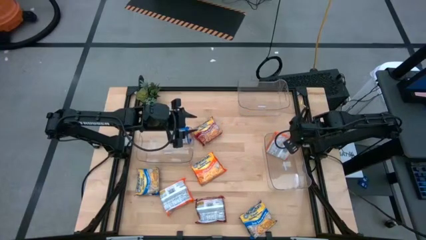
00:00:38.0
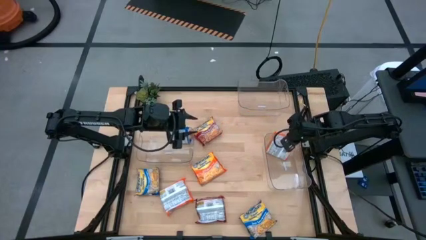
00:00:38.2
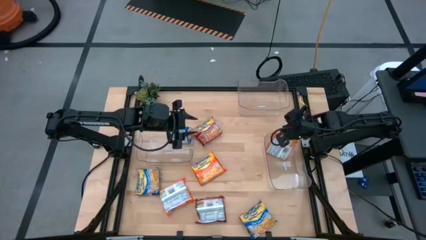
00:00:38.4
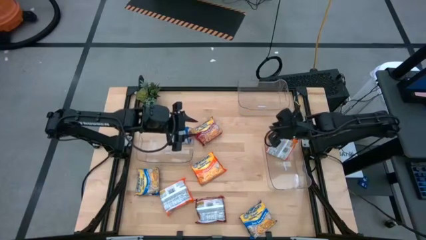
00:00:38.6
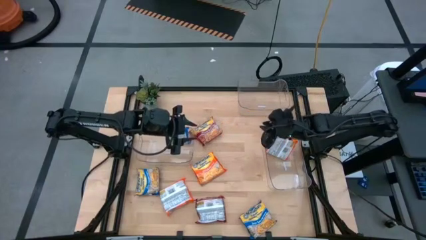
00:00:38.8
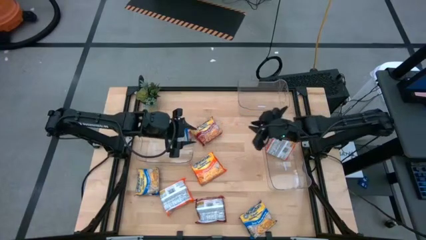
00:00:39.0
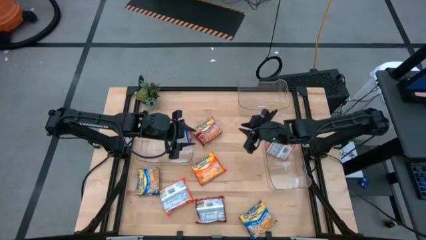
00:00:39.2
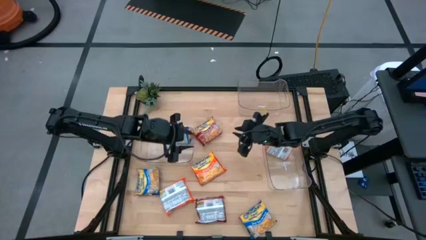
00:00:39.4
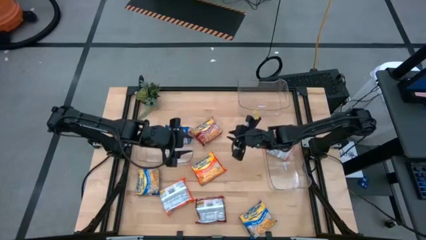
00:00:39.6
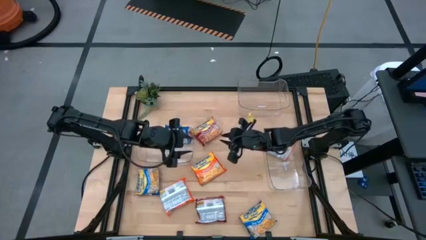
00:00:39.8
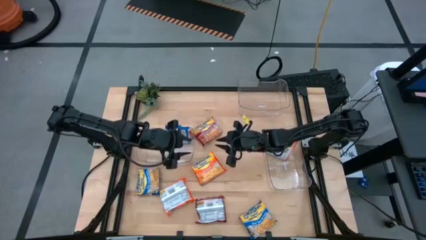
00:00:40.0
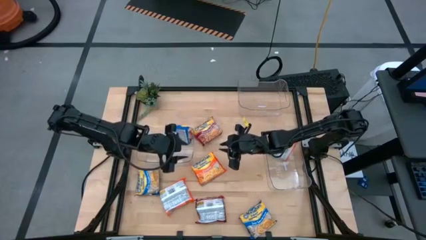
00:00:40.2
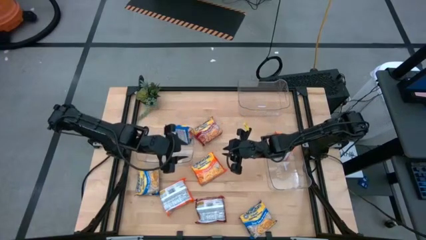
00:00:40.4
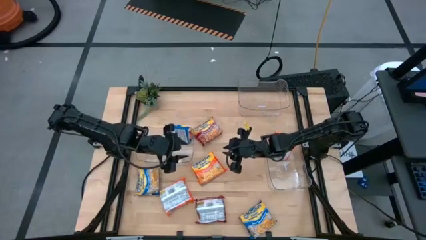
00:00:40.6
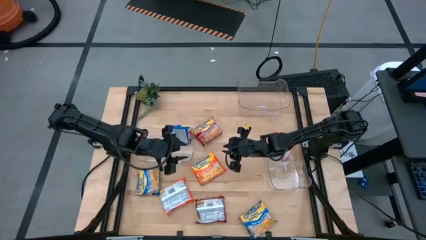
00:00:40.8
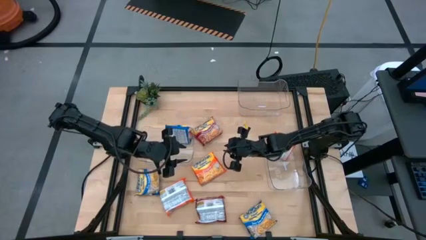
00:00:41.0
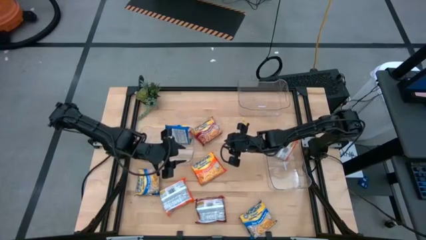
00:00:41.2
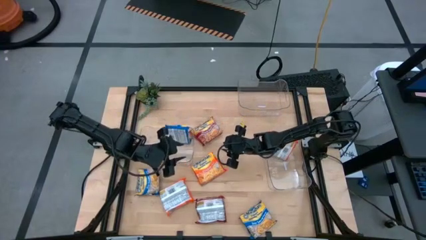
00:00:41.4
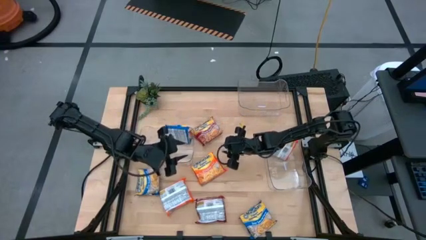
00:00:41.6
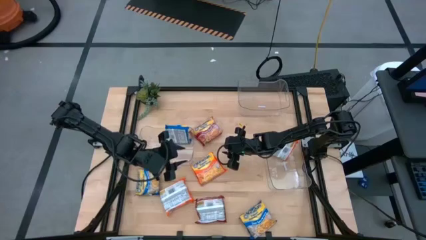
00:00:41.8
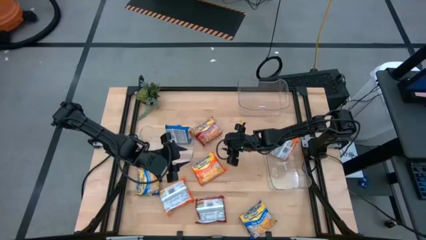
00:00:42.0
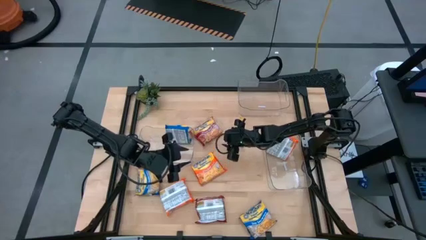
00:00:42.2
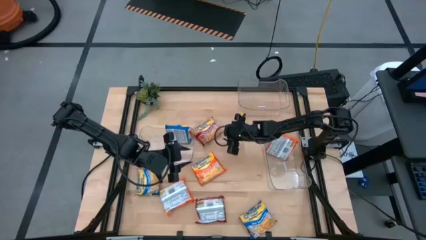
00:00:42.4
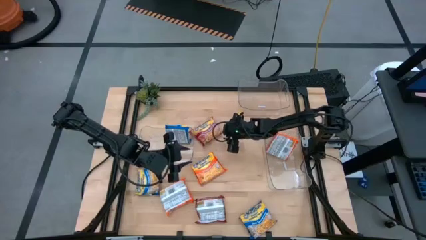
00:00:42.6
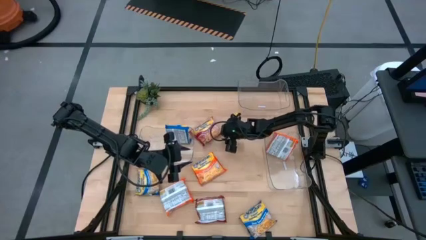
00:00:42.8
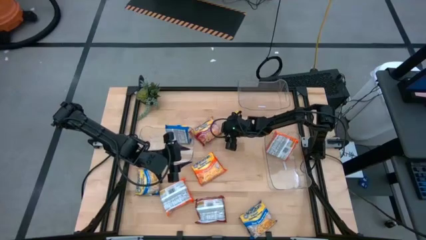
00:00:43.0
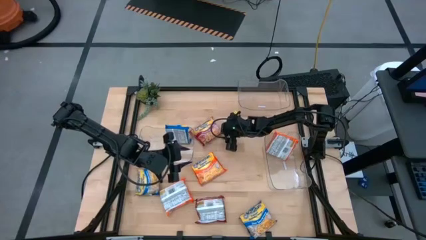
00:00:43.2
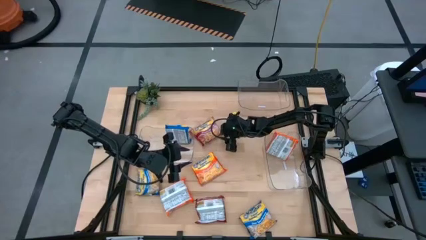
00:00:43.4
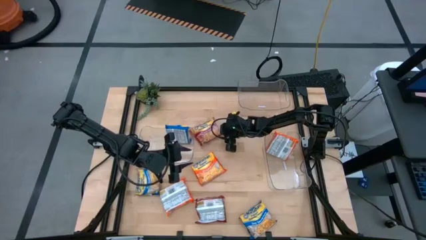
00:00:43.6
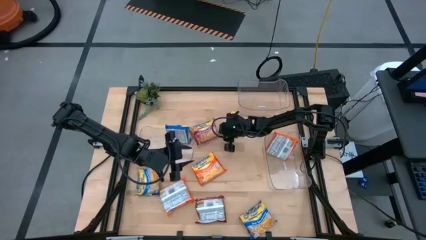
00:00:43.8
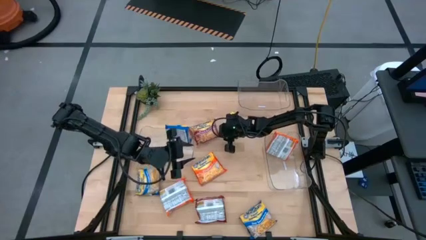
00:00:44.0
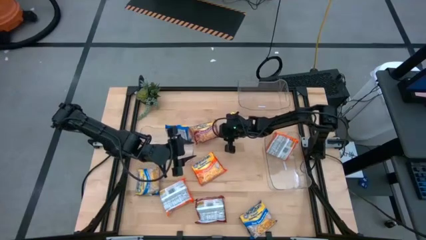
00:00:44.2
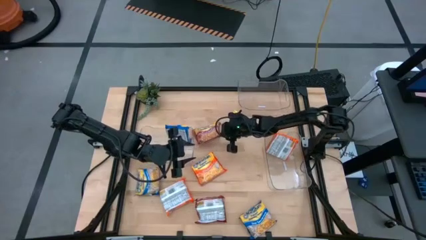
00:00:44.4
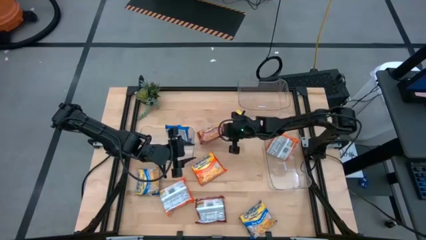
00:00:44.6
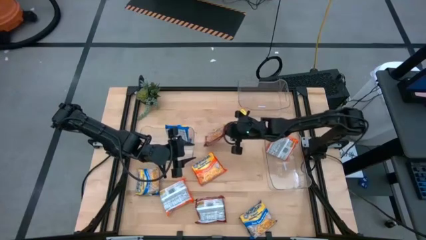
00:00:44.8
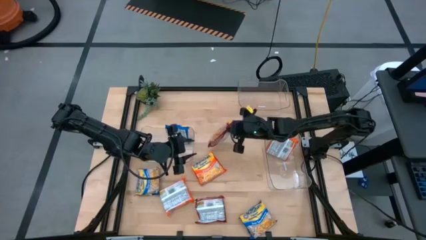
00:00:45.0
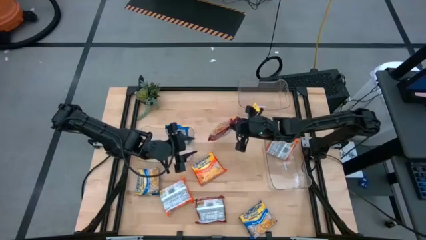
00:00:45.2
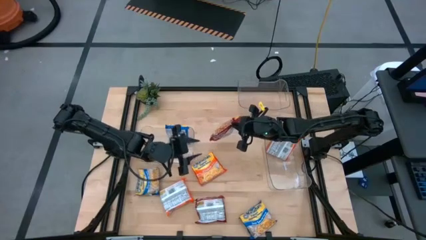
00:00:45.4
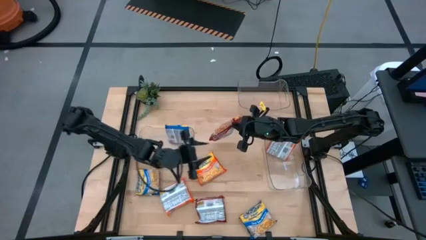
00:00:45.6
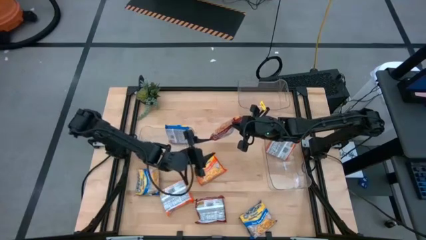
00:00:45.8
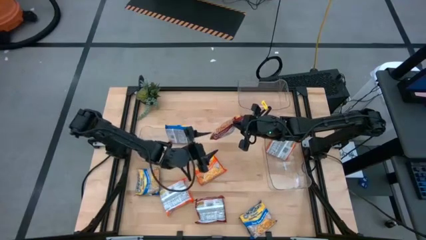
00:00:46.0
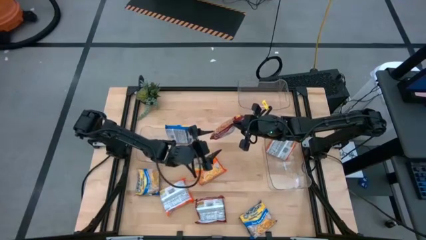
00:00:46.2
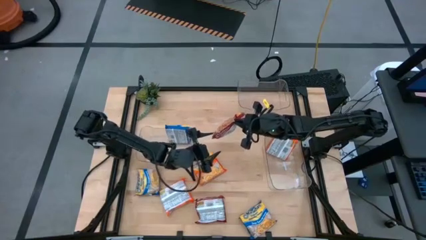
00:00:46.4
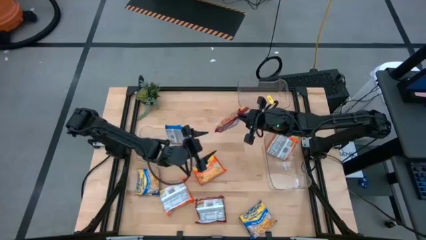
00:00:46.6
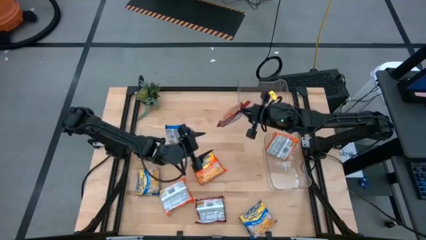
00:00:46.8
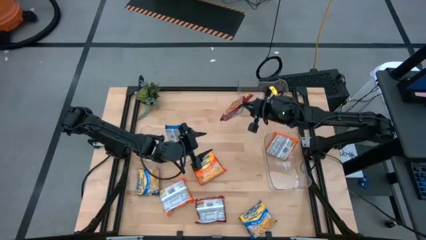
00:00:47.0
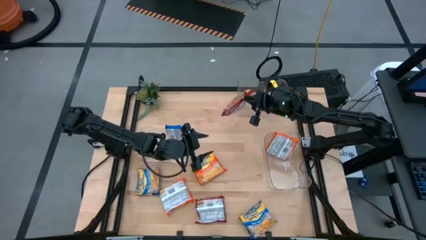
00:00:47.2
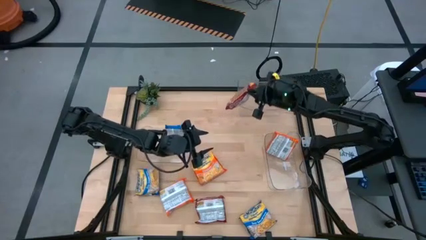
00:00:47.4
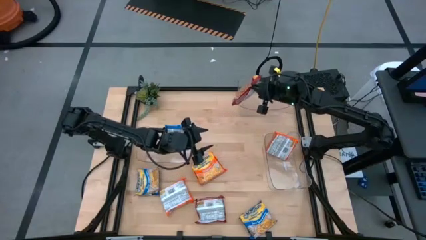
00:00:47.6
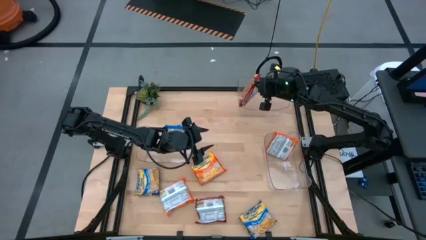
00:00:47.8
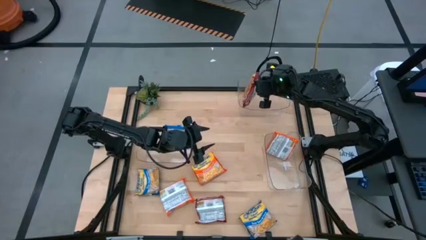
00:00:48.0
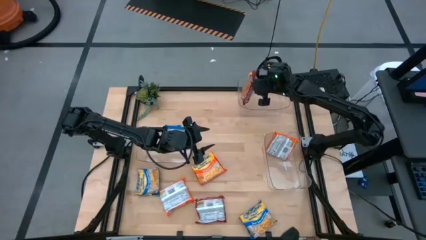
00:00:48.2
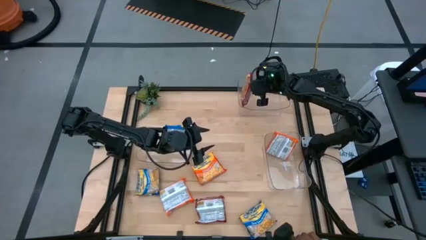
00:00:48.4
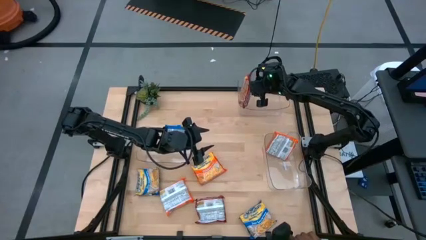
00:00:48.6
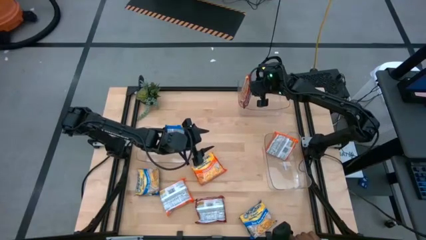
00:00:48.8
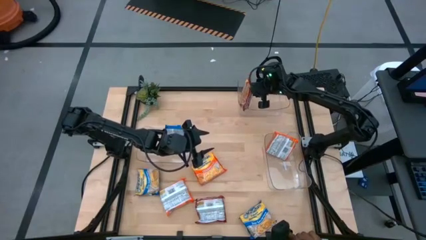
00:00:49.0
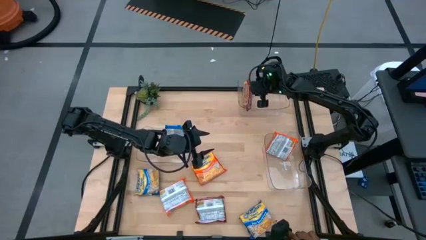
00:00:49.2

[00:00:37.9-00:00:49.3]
Task: Sort Maruchan noodles
Put the top red noodle pack into the top transparent bin

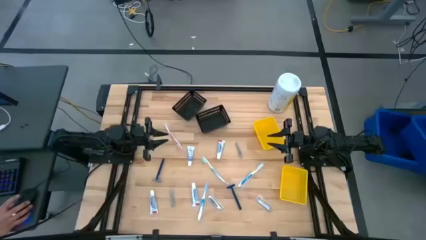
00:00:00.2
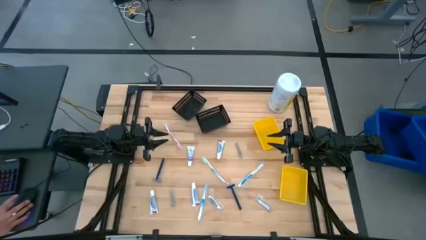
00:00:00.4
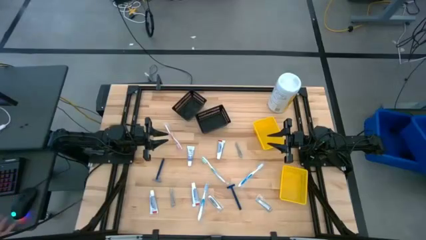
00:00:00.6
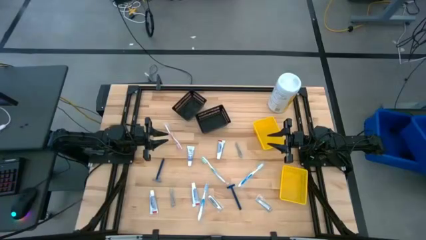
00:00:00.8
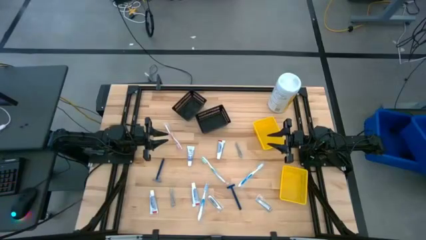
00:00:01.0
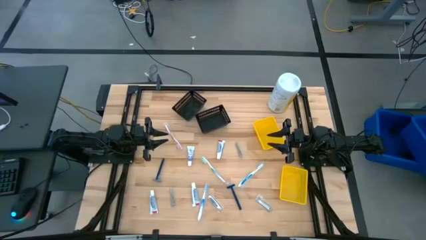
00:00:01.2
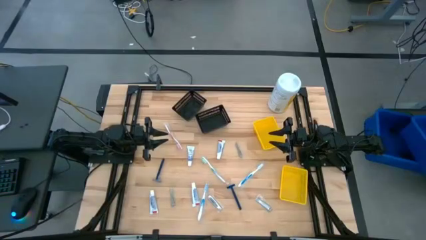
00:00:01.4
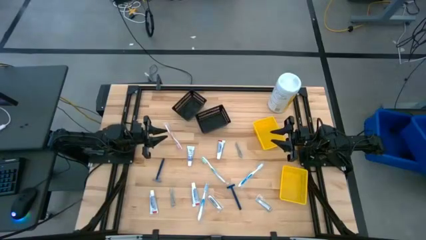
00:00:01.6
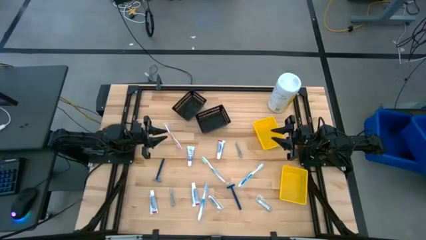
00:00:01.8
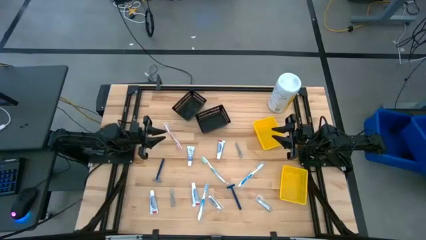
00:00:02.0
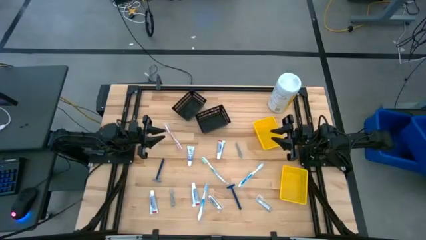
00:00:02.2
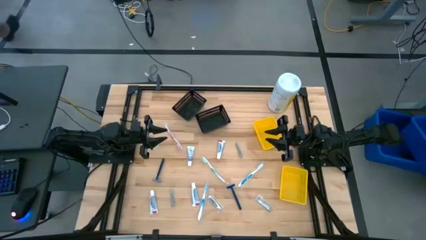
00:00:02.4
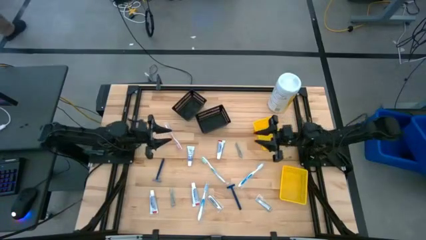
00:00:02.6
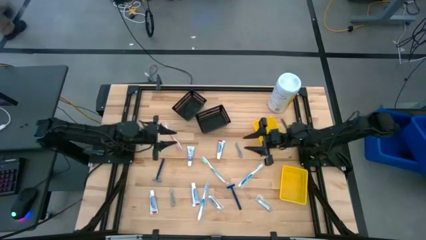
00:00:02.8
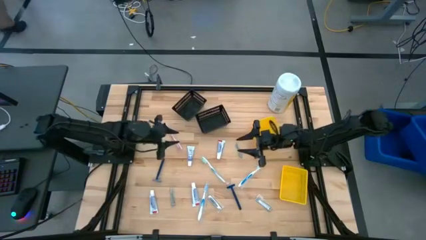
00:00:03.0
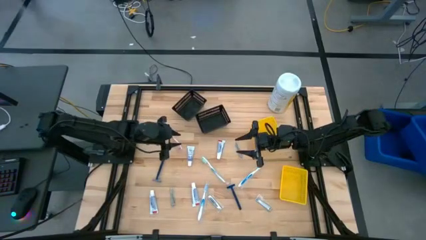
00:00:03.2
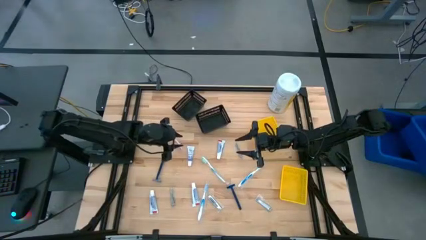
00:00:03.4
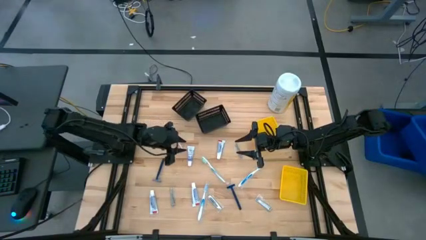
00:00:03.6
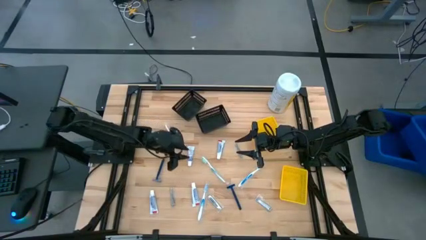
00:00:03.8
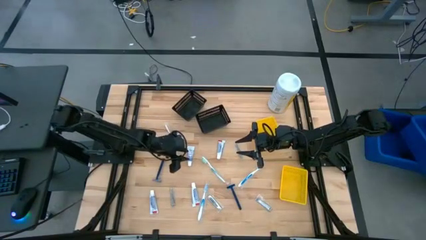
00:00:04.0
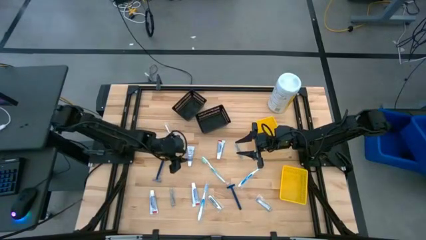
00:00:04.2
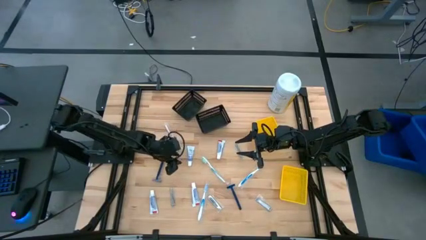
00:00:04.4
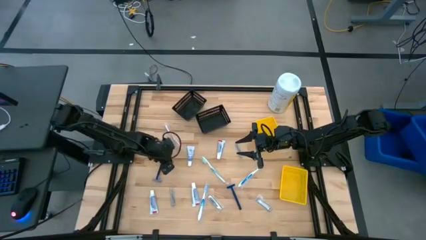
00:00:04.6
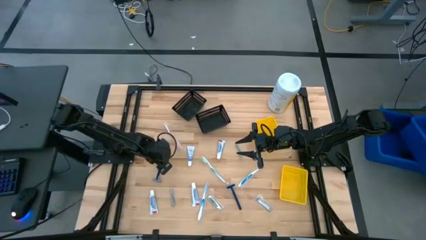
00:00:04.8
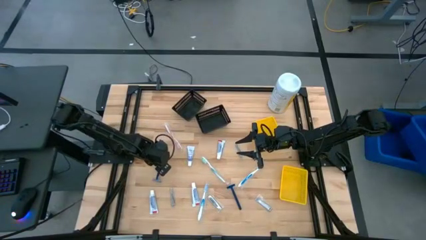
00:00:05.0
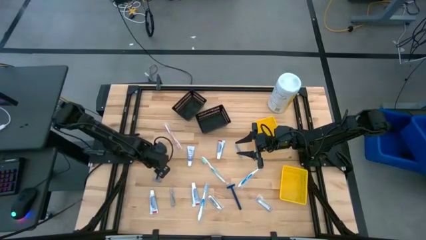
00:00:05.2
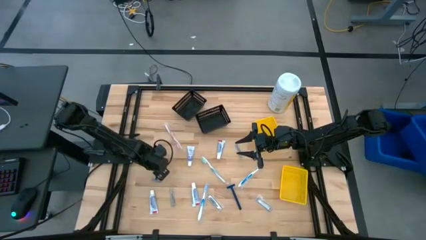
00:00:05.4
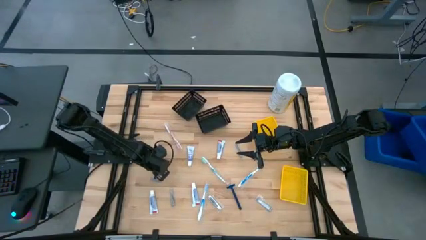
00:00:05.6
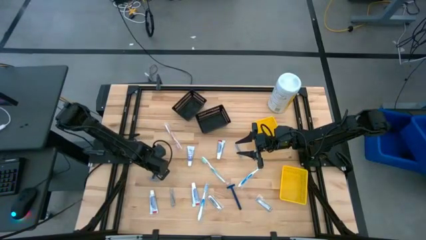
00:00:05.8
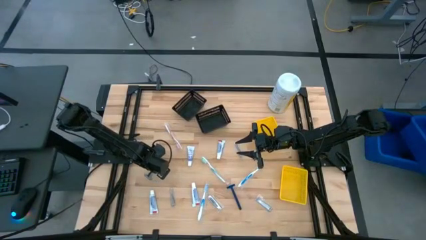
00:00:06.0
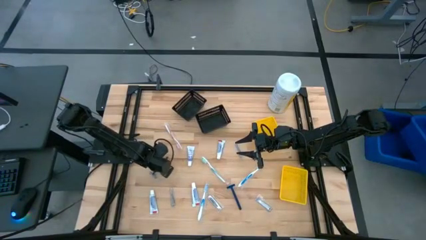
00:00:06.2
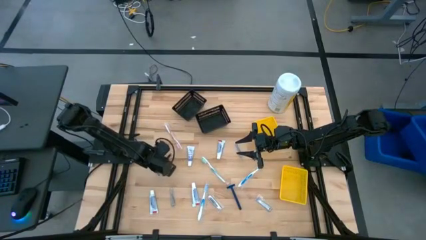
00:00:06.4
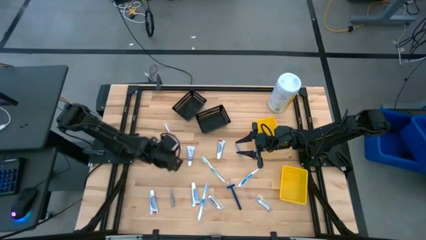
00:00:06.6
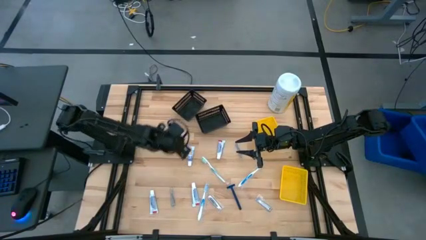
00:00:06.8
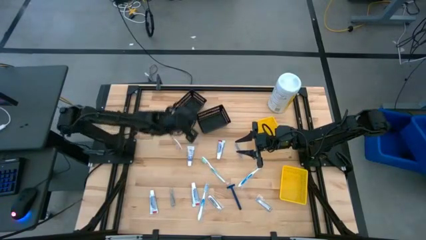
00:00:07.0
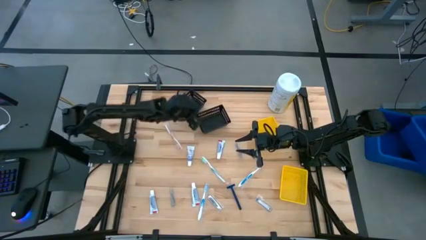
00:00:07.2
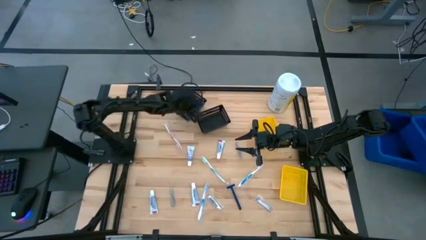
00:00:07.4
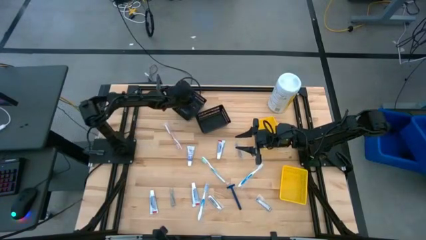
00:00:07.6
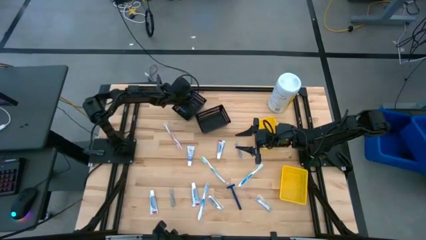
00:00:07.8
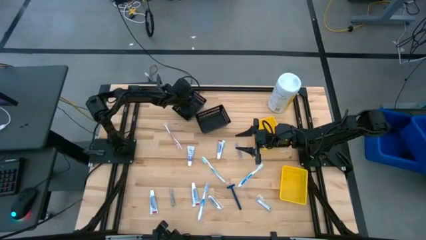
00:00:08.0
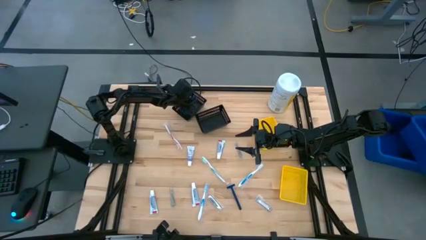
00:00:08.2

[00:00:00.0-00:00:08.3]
Task: Pick & Place Travel size toiletries
Put the razor into the top black bin
